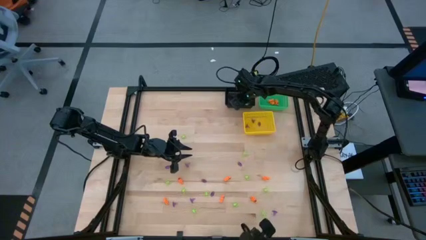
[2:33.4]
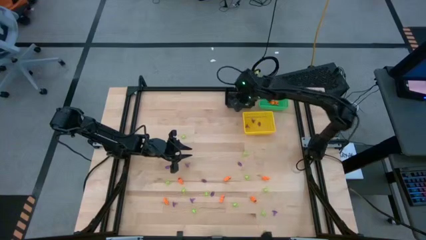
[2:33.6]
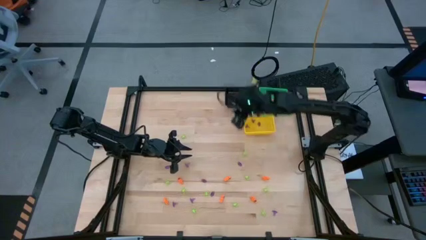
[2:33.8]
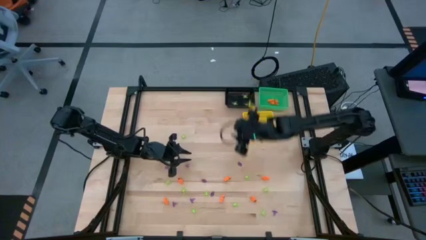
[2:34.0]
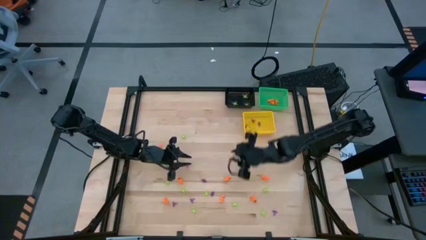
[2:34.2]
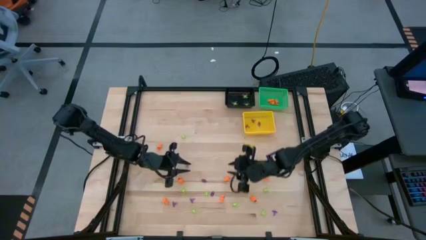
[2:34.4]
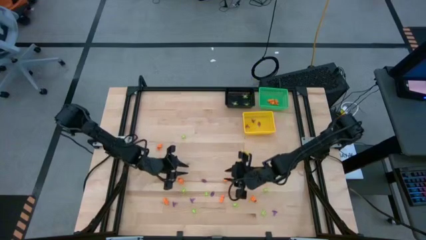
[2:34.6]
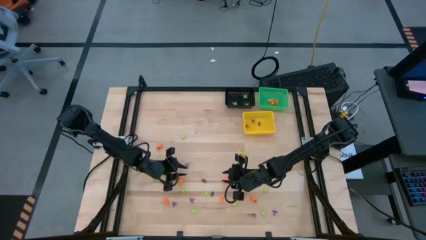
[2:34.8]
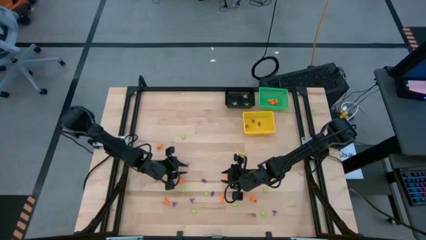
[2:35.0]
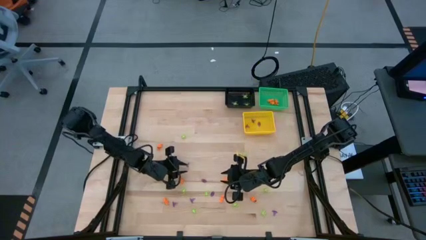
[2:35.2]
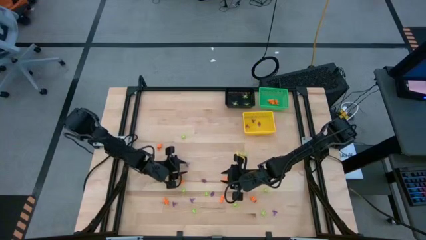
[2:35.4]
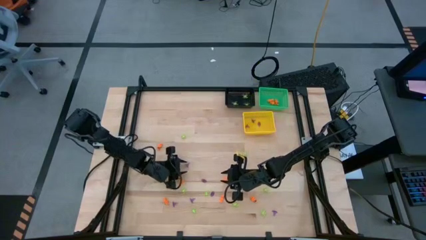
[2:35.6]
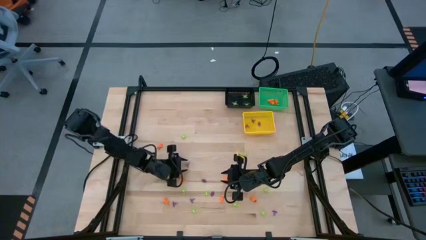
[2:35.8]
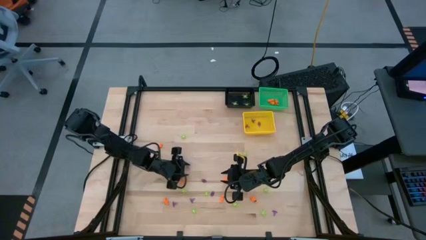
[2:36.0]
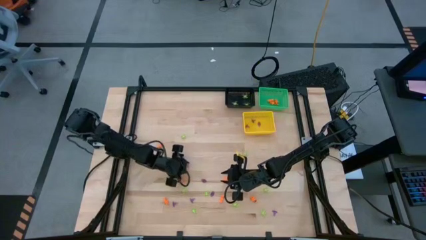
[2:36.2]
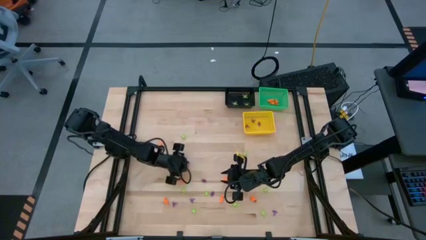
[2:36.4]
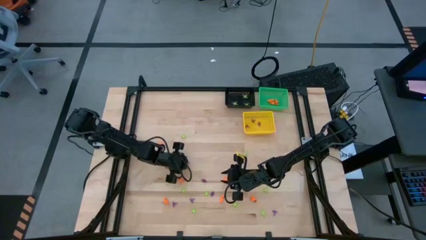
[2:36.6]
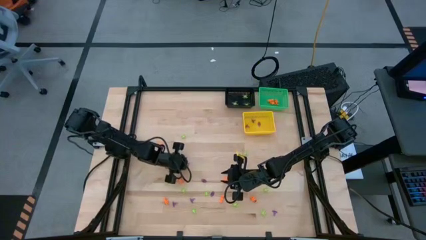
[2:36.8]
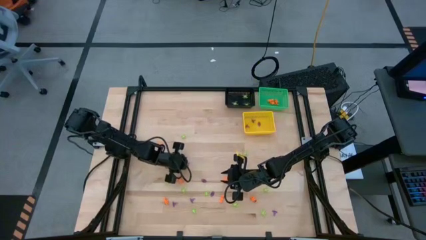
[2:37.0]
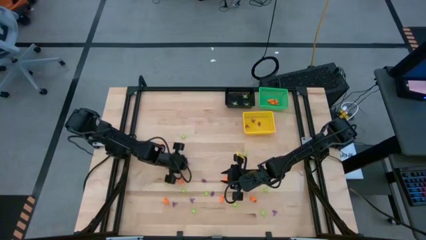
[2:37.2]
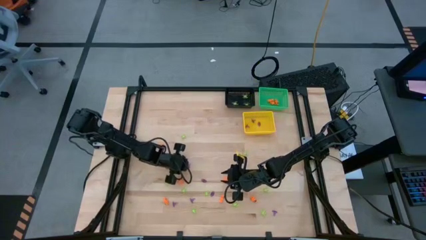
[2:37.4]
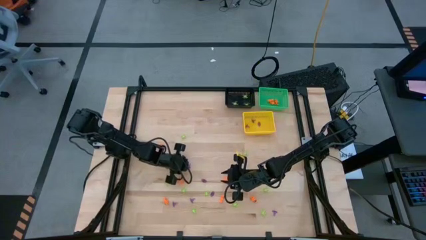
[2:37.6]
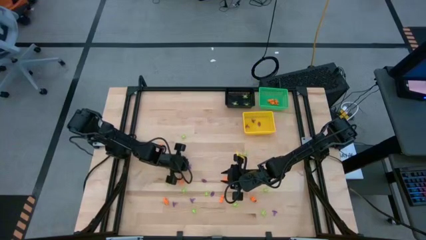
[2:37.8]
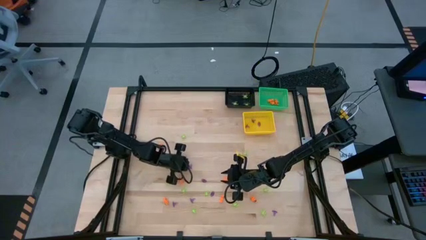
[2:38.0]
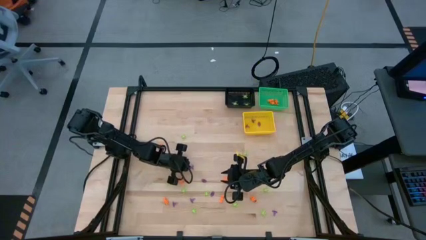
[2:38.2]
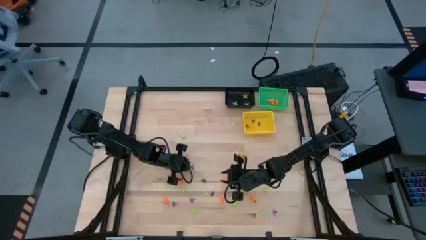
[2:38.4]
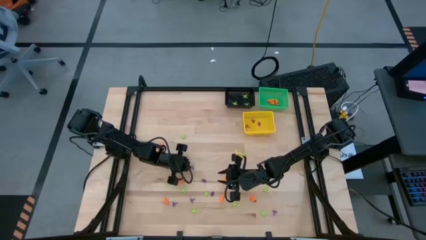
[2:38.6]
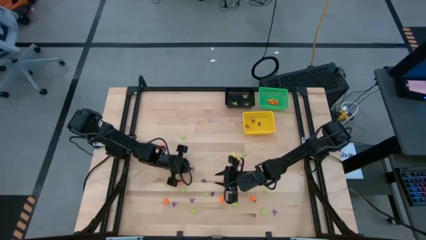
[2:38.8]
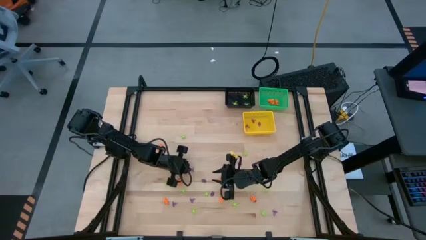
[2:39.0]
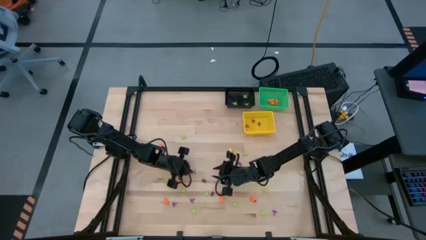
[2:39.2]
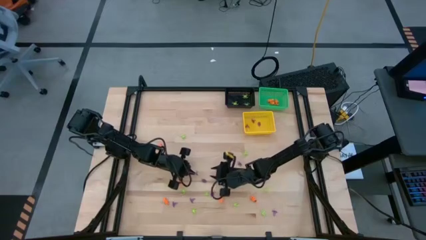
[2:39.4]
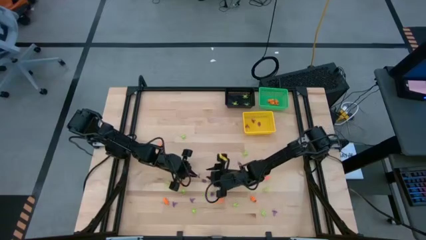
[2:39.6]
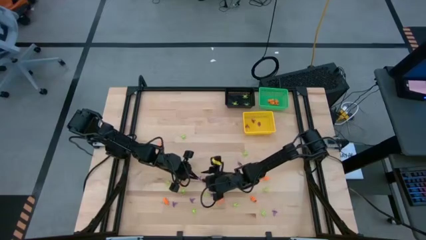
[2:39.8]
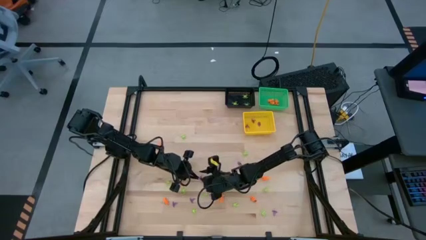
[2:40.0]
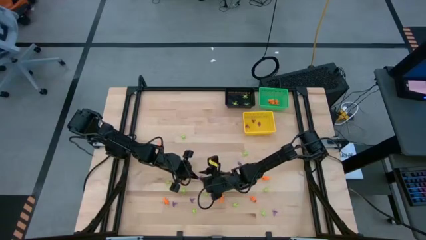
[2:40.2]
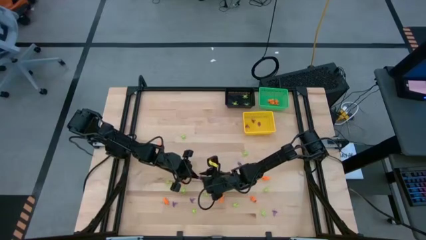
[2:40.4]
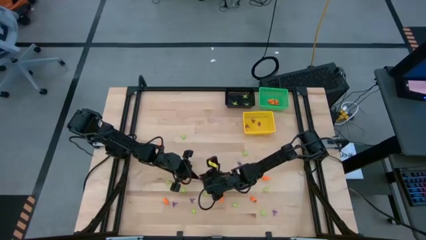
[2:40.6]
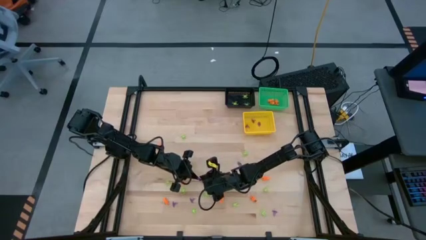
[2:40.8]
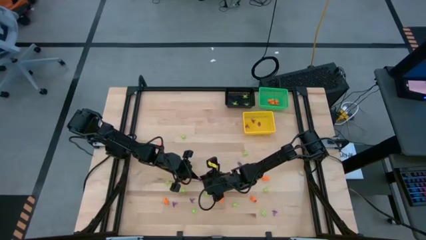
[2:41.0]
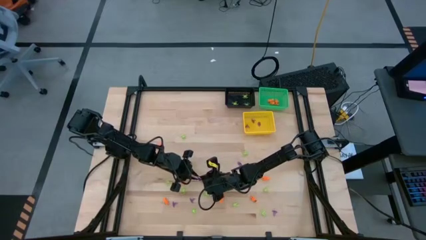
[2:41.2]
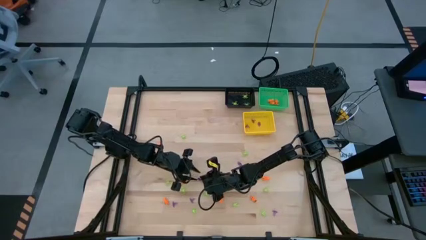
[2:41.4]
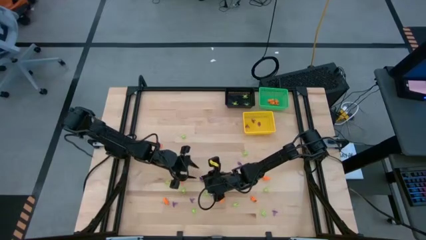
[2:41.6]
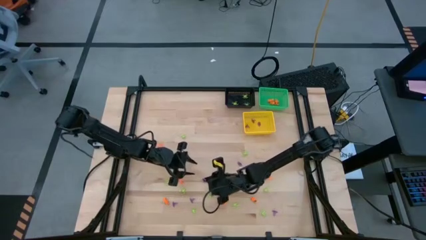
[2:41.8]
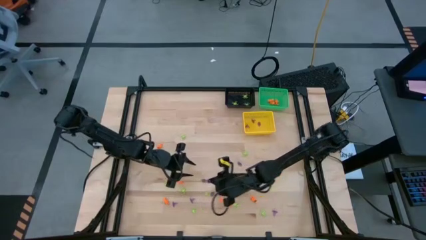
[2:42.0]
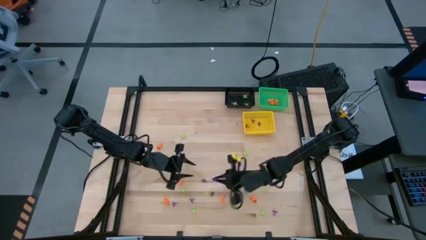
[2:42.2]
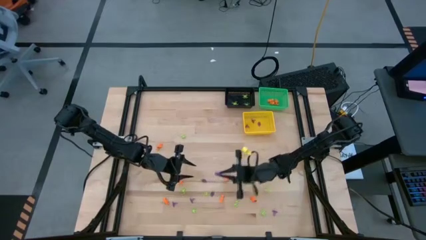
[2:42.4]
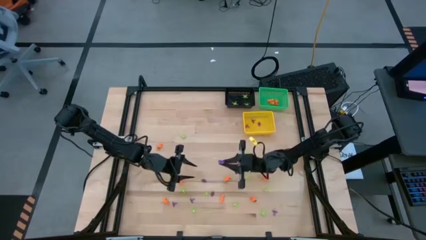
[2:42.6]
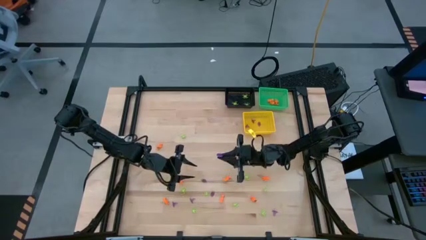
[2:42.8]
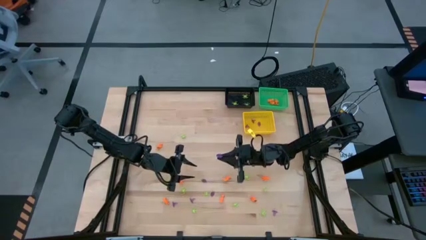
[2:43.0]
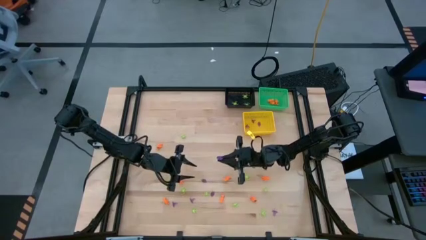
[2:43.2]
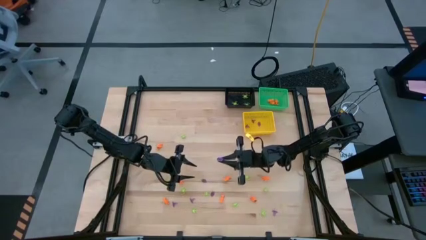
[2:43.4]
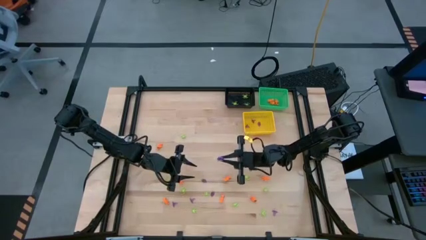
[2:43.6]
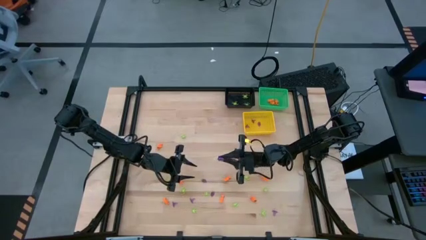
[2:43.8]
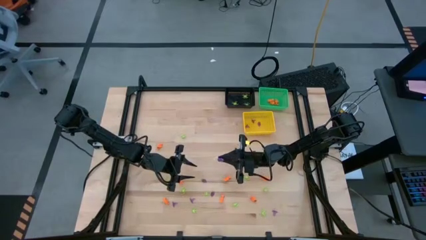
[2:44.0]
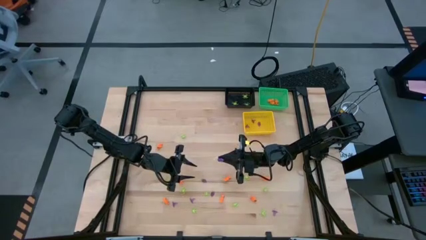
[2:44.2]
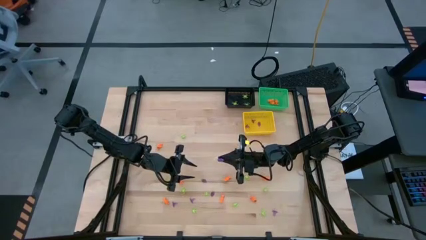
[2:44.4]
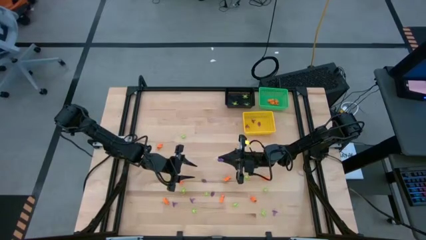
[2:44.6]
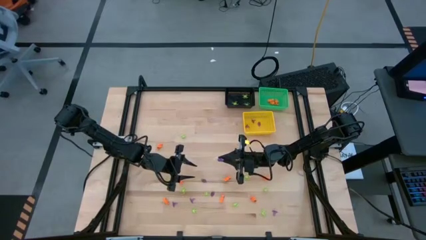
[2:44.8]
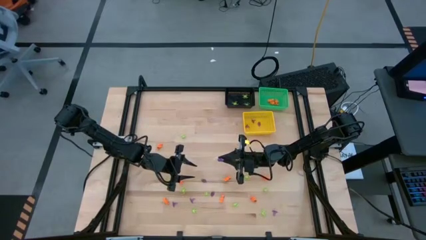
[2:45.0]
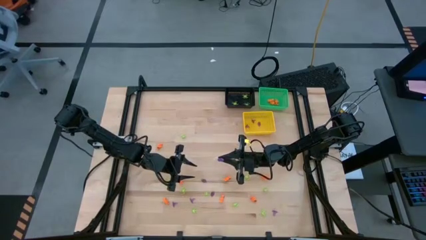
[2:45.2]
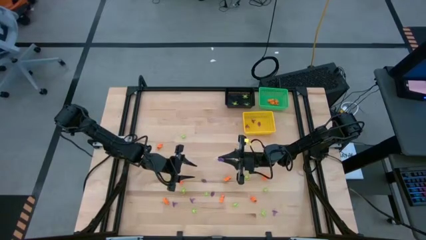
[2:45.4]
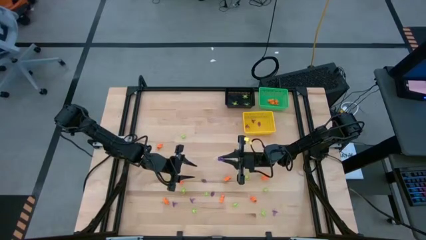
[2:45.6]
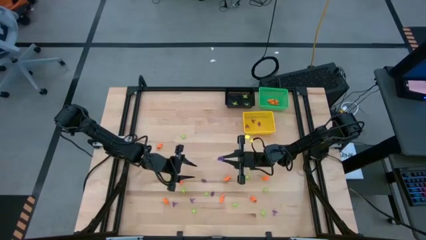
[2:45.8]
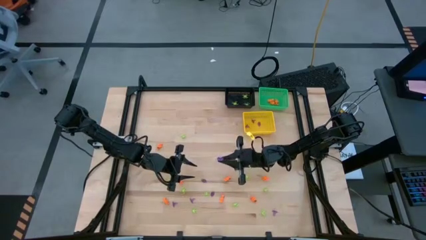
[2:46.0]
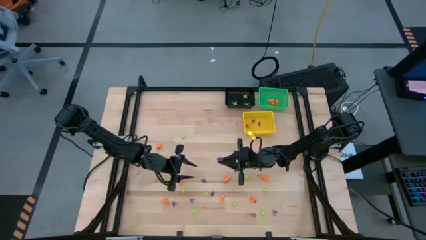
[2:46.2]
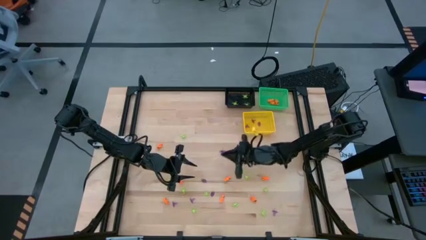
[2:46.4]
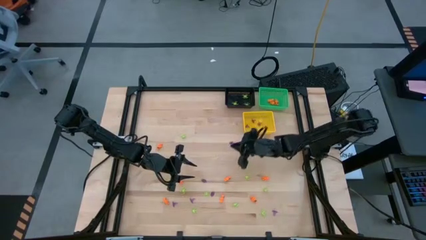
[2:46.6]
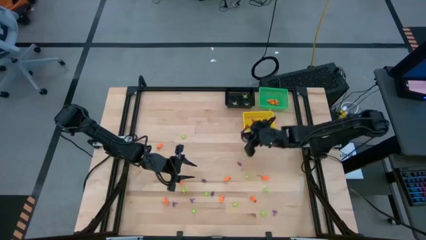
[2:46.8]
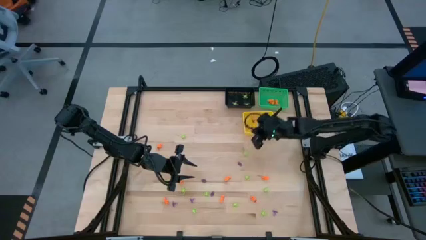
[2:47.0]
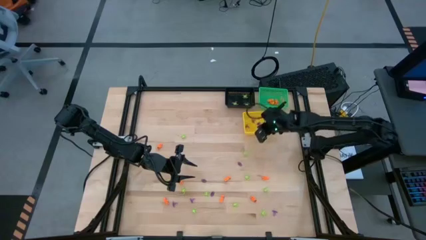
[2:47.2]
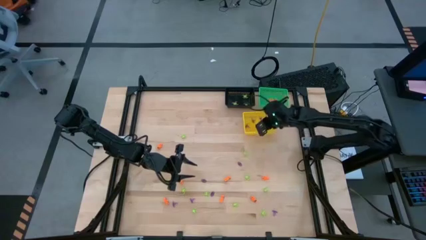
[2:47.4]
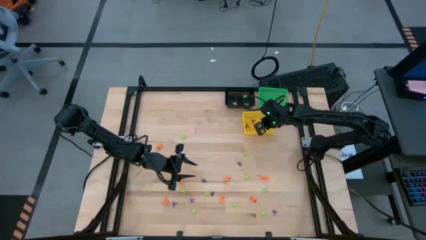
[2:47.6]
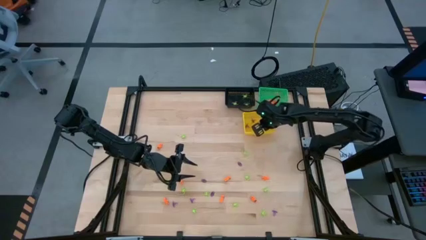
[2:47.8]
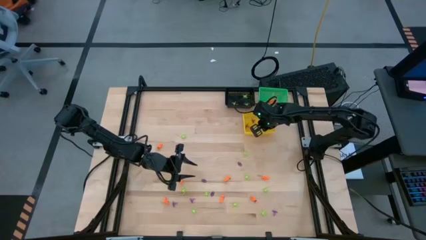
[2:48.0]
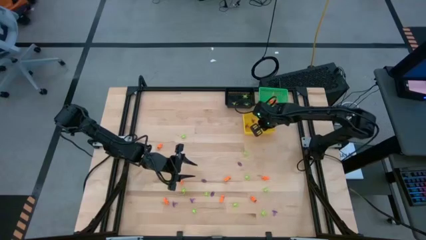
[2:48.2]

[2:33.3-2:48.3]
Task: Sort Halloween decoration
Put the violet witch hat toy into the yellow basket

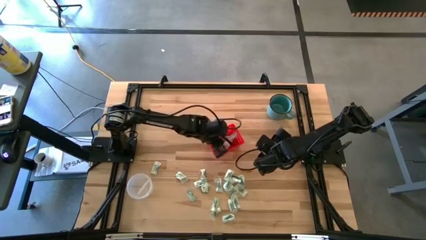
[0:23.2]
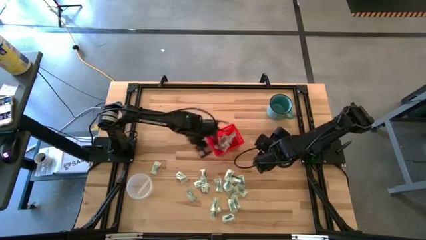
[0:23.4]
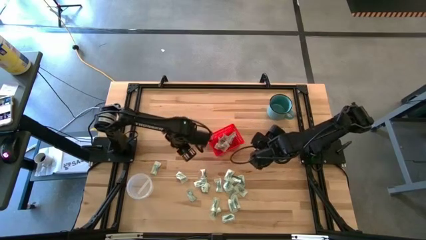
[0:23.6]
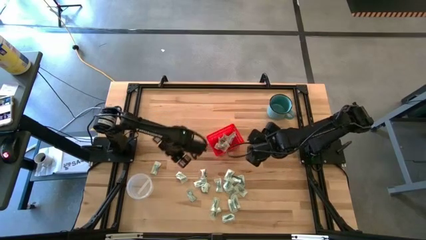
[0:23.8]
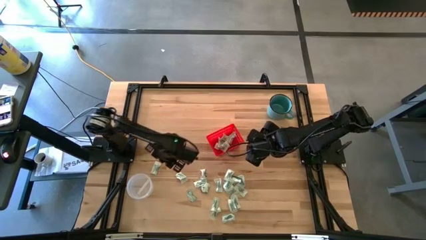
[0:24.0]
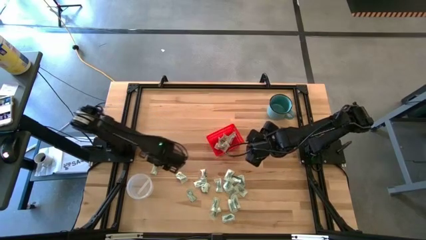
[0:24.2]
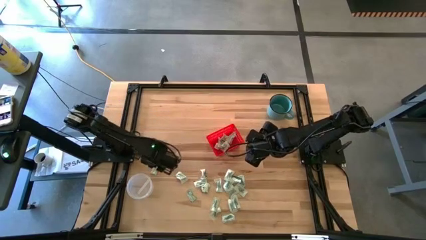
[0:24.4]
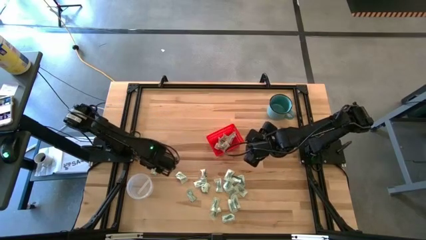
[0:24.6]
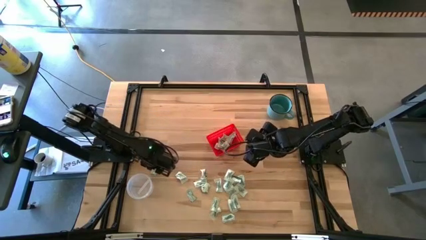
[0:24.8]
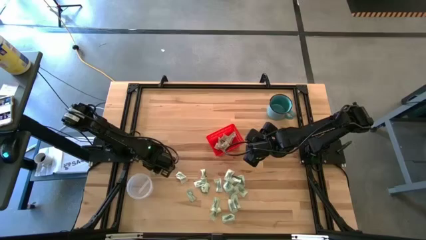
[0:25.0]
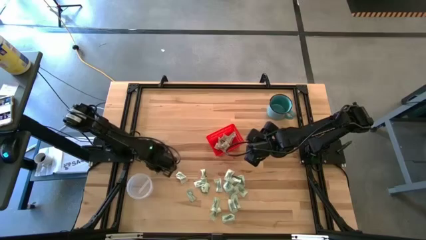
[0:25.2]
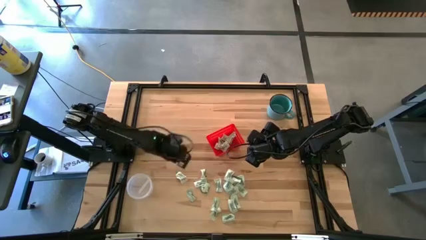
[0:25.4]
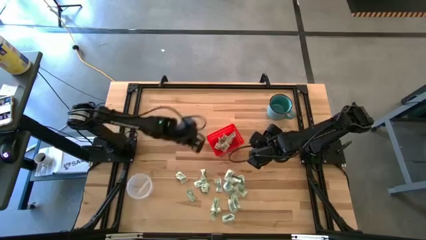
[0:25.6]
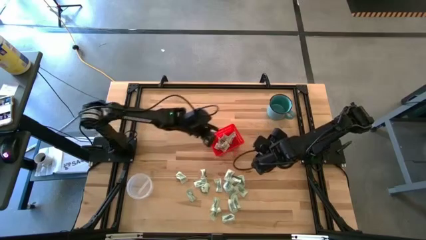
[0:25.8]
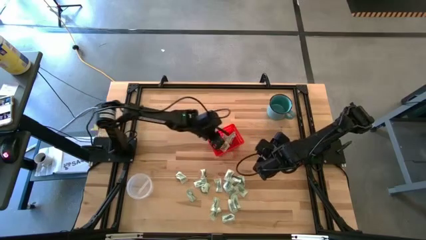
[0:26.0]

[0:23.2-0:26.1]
Task: Pick and place items into bin
Put the stevia packet into the red bin
